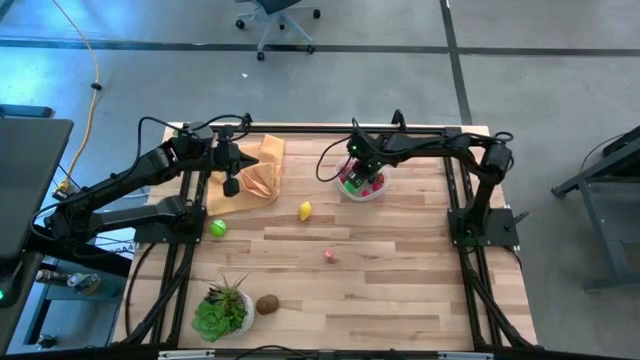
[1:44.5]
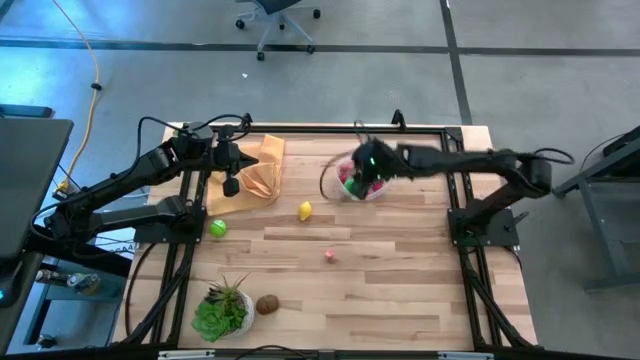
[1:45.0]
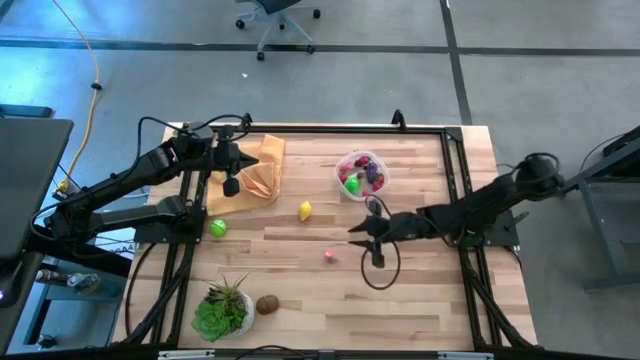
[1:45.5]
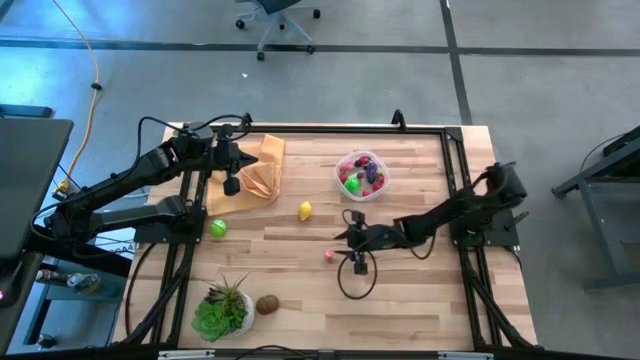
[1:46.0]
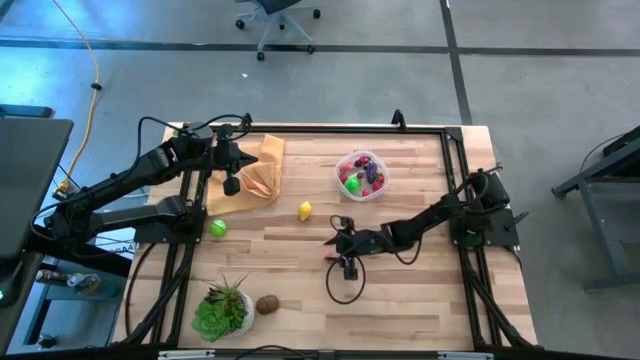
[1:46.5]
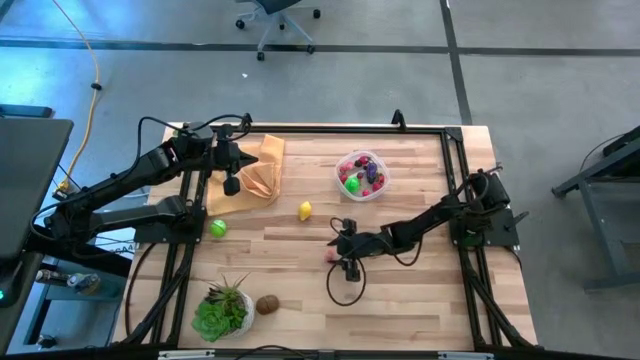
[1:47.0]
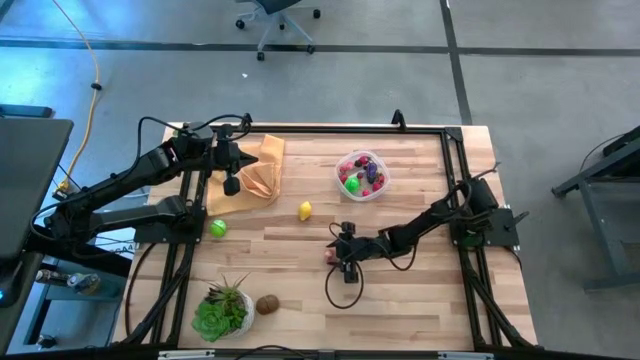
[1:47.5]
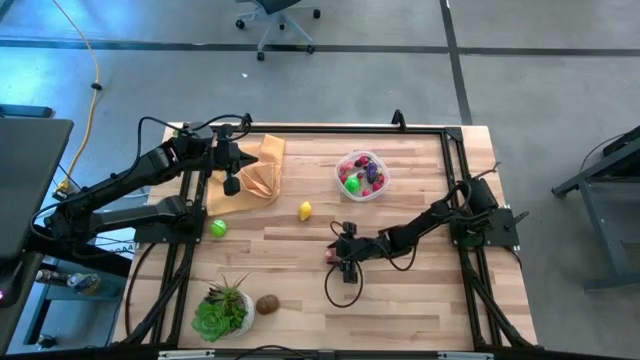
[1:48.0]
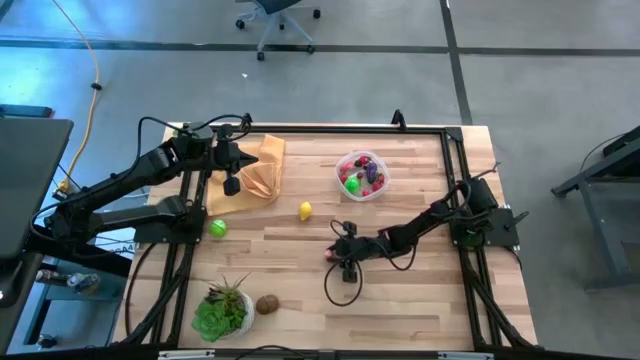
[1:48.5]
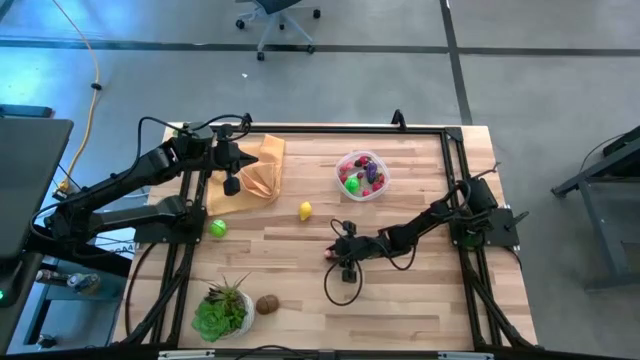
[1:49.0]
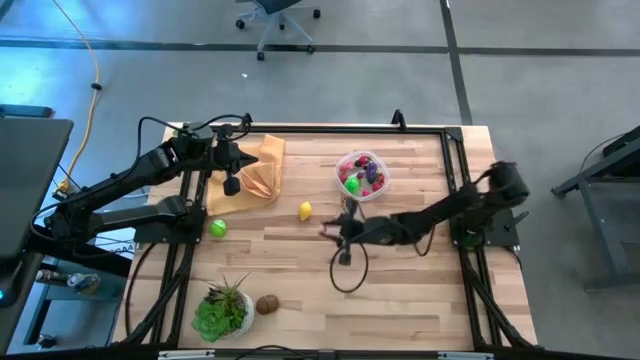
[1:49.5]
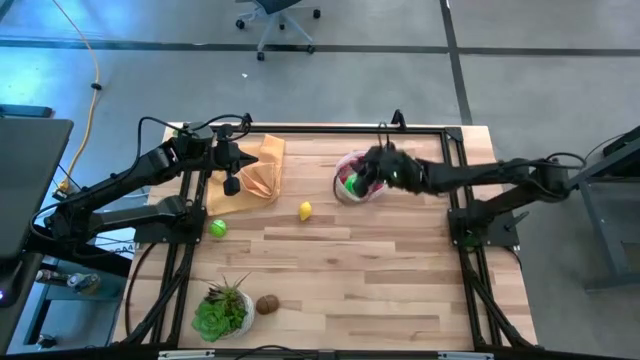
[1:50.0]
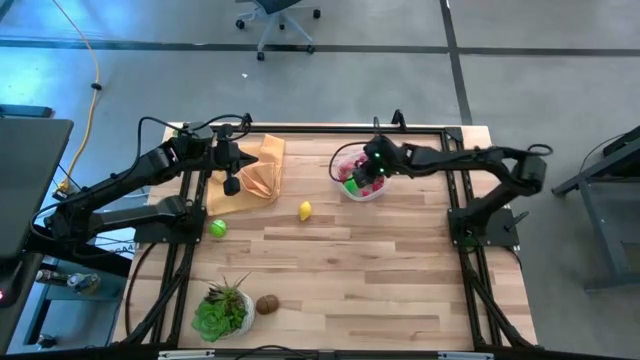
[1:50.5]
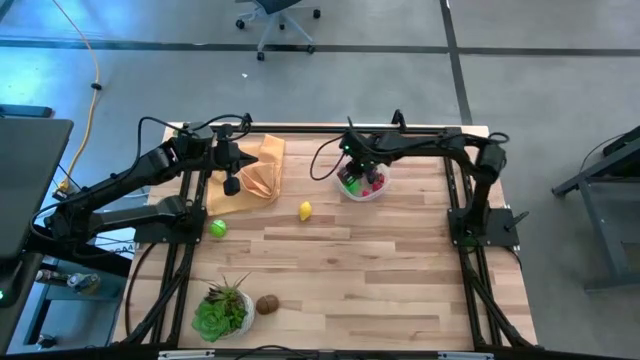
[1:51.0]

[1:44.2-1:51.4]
Task: Pick and placing Produce into tupperware
Put the pink peach into the transparent container

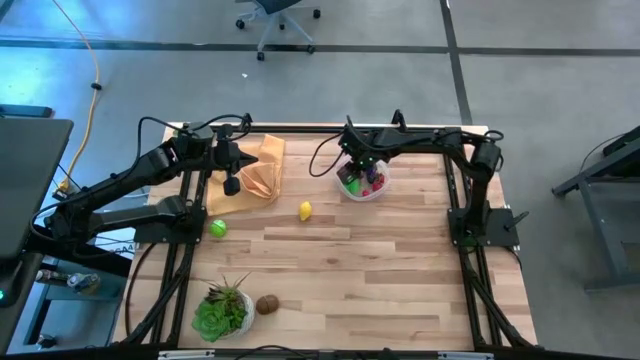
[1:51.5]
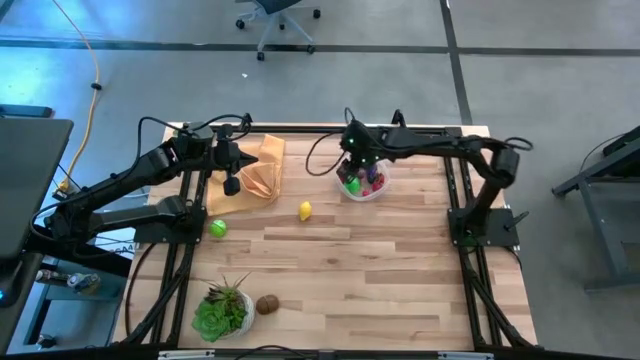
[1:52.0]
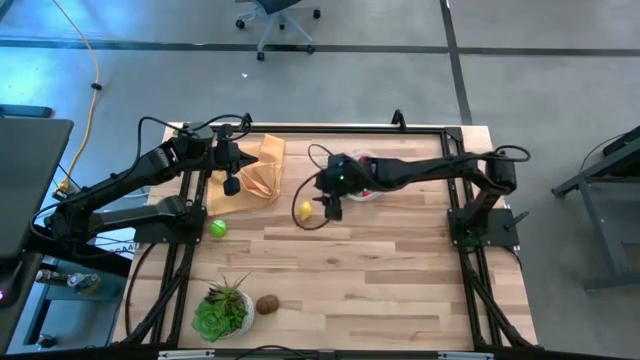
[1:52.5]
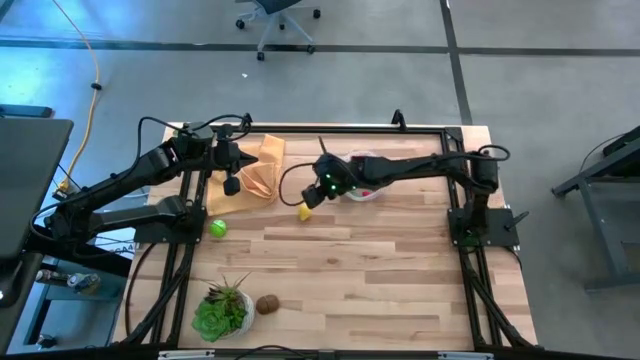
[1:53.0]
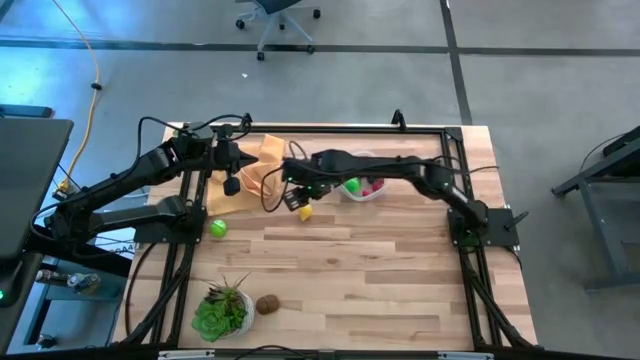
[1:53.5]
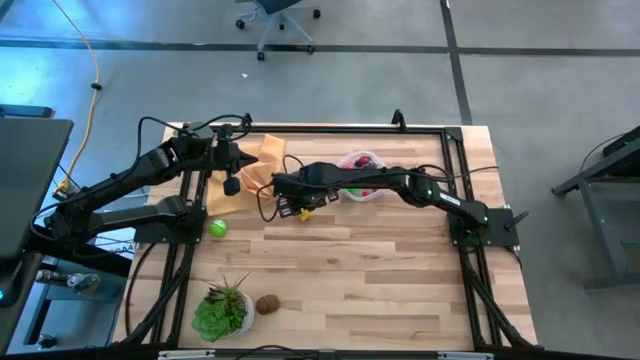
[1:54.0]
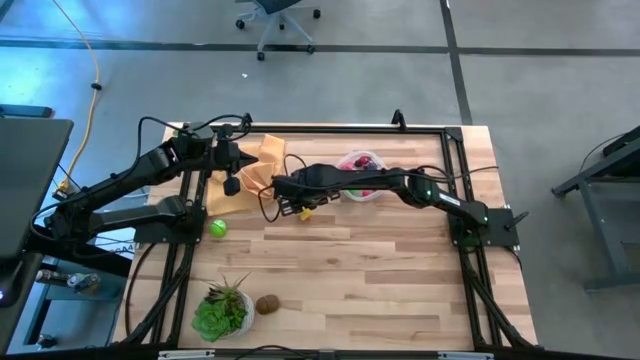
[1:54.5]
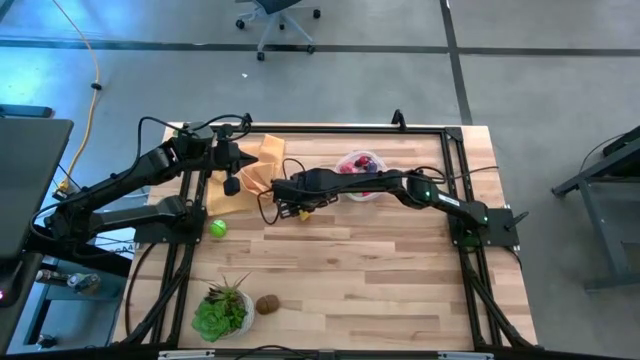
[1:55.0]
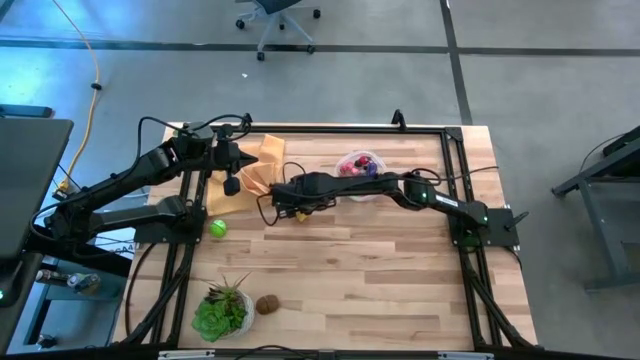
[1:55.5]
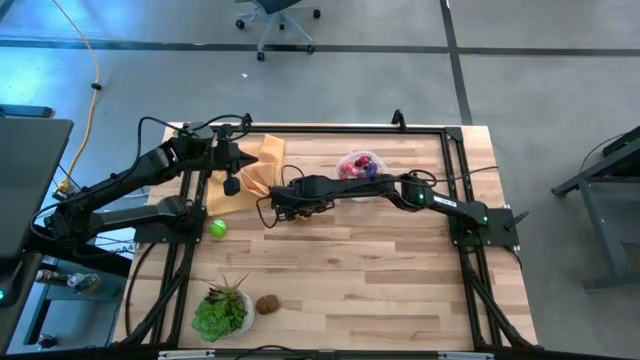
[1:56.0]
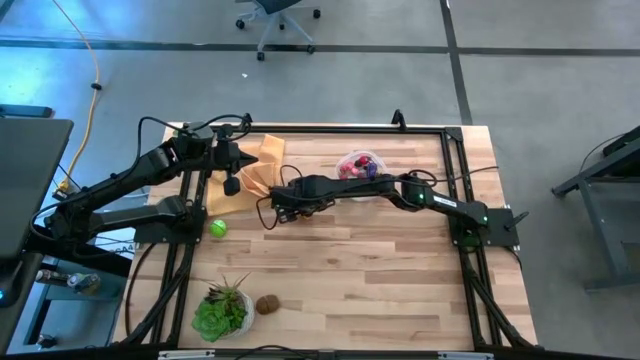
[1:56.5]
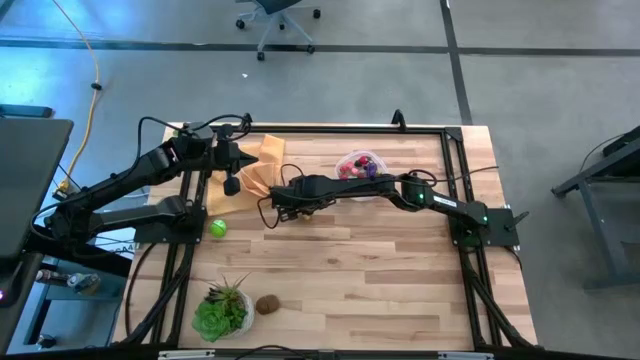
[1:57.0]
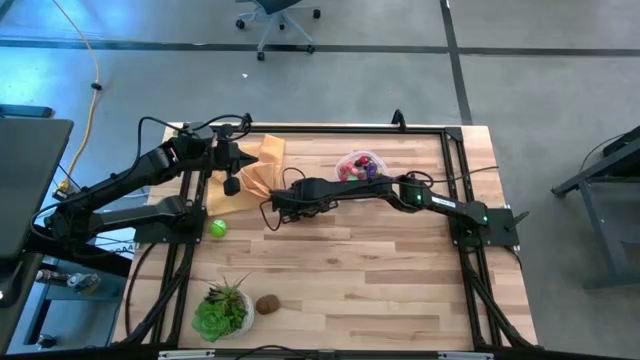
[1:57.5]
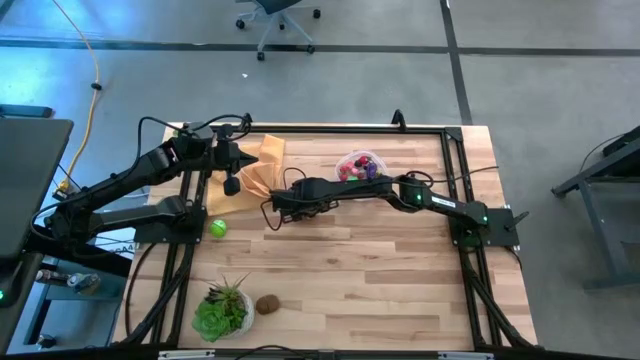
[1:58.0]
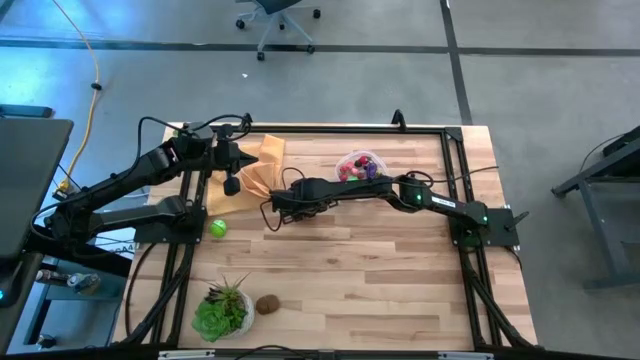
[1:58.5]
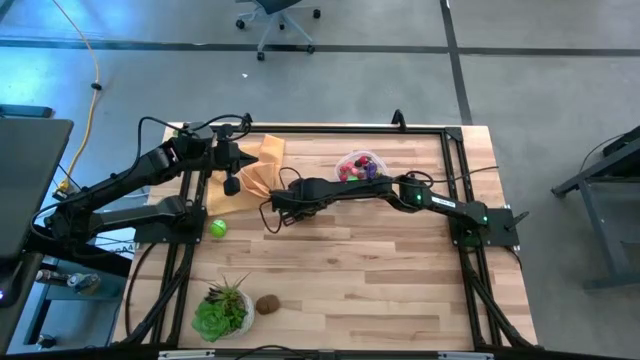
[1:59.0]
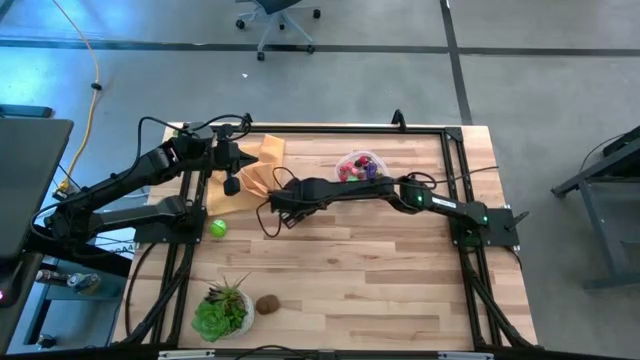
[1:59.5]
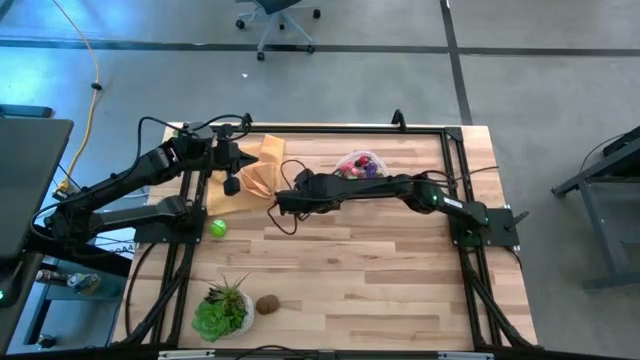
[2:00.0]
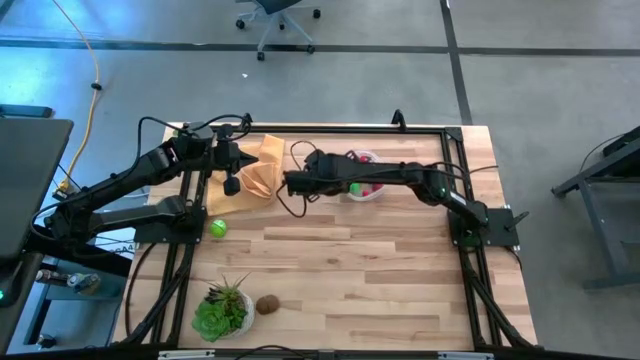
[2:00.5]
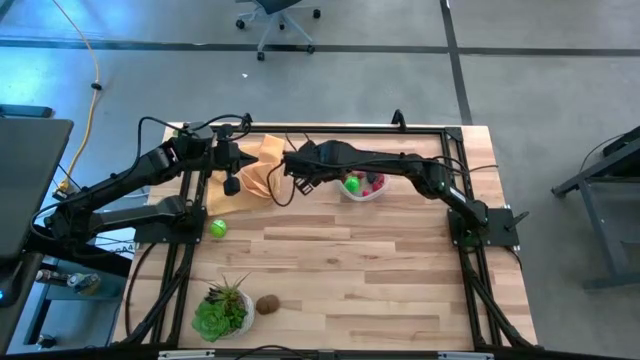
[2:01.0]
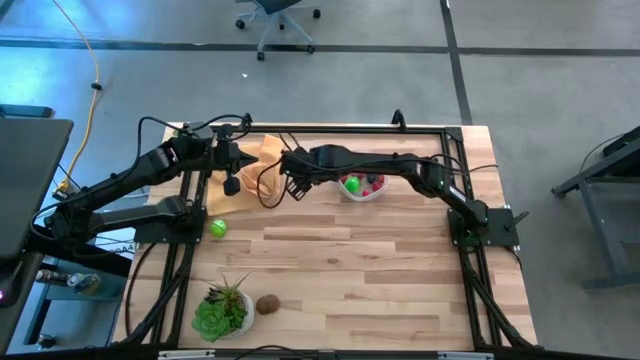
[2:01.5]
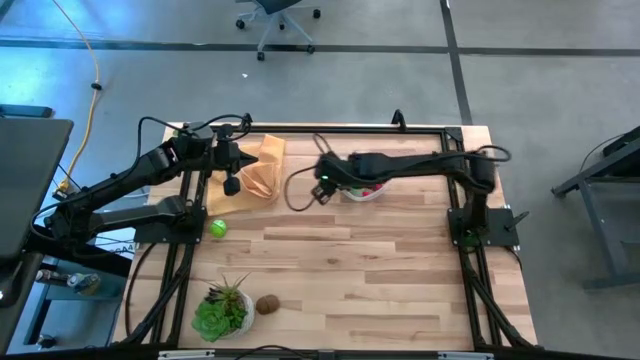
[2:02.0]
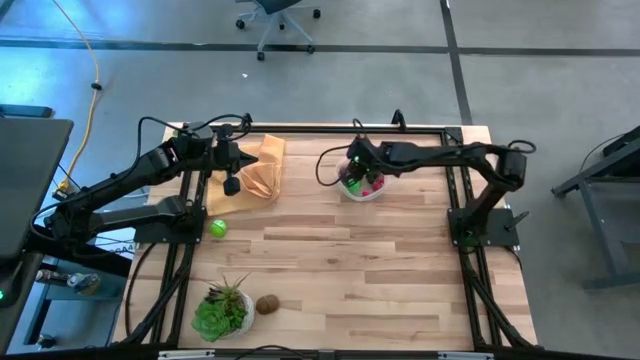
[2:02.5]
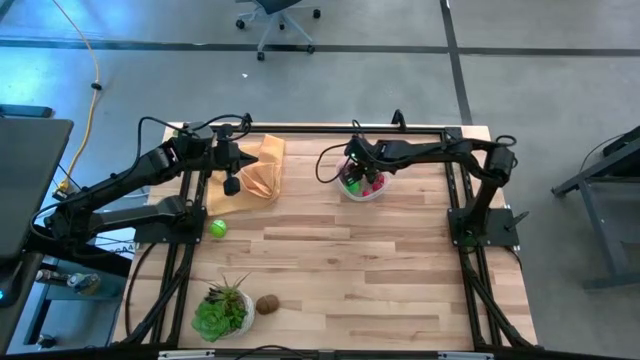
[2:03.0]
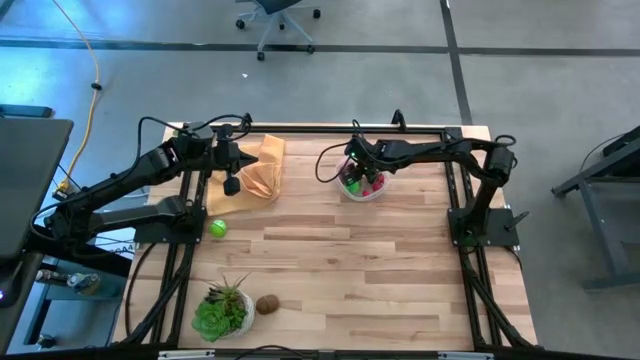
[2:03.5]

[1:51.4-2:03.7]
Put the yellow lemon into the transparent container
